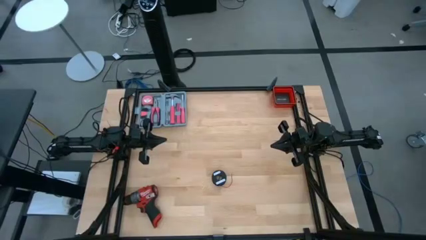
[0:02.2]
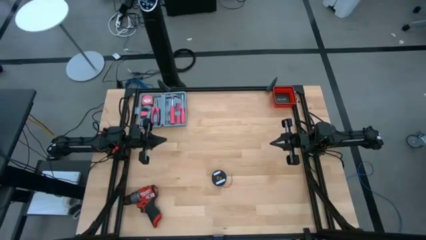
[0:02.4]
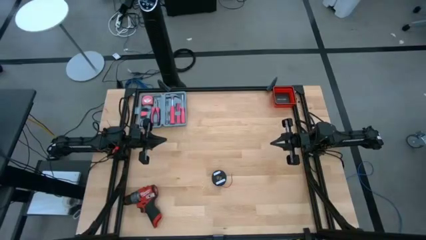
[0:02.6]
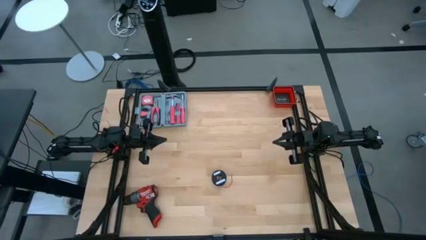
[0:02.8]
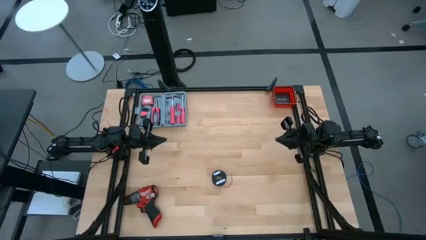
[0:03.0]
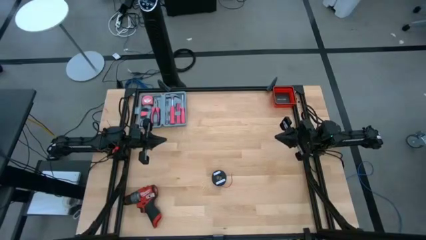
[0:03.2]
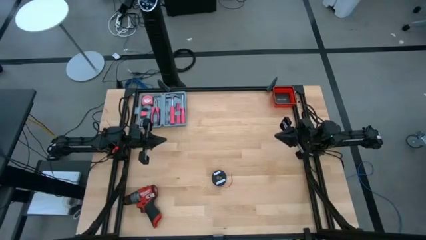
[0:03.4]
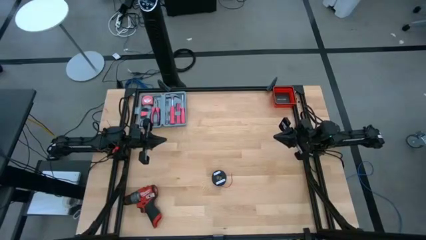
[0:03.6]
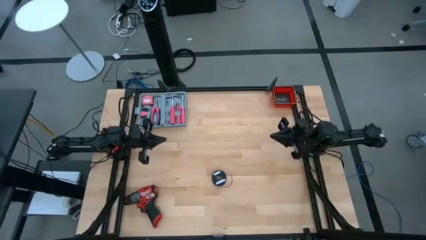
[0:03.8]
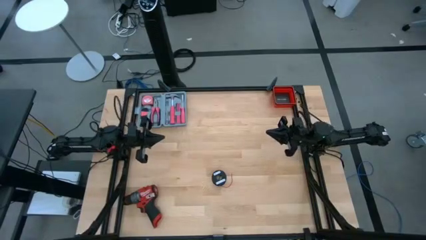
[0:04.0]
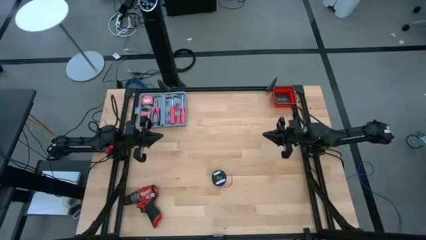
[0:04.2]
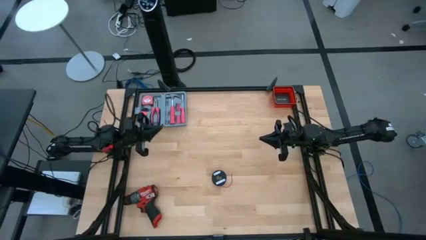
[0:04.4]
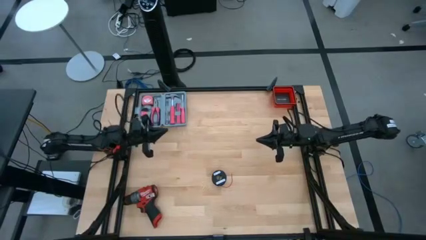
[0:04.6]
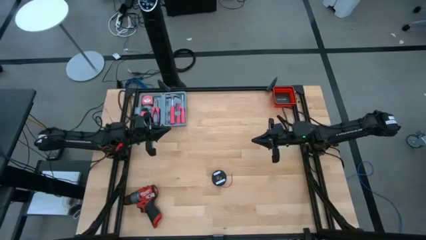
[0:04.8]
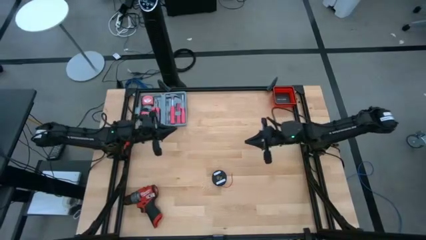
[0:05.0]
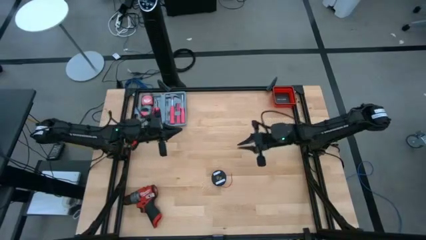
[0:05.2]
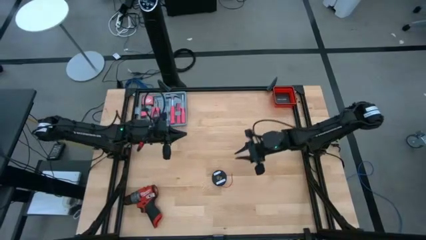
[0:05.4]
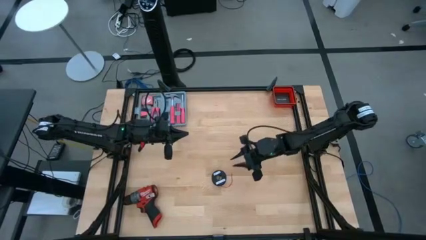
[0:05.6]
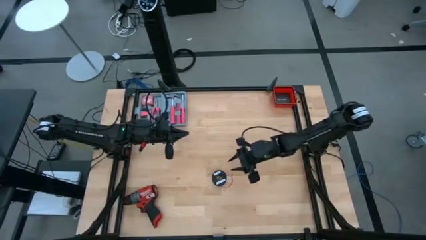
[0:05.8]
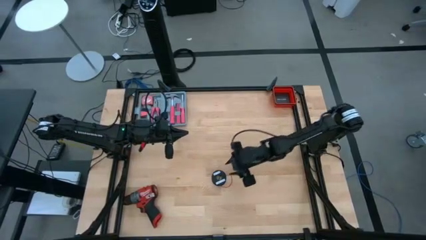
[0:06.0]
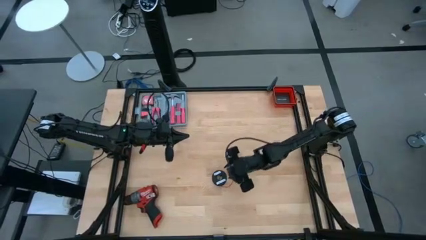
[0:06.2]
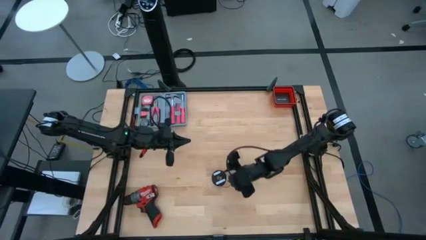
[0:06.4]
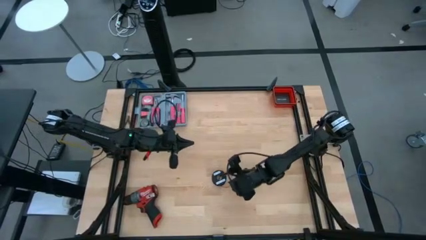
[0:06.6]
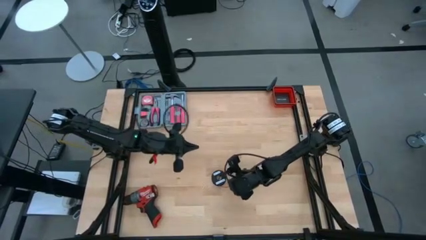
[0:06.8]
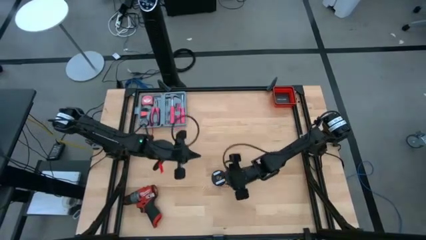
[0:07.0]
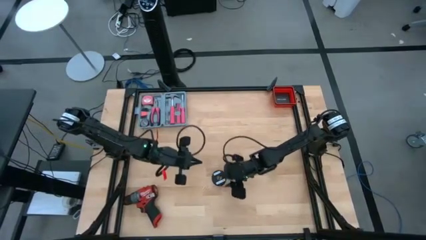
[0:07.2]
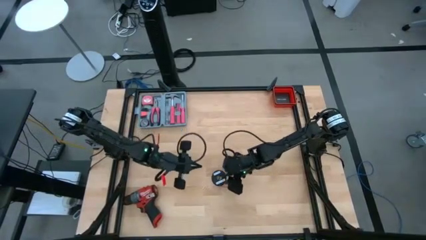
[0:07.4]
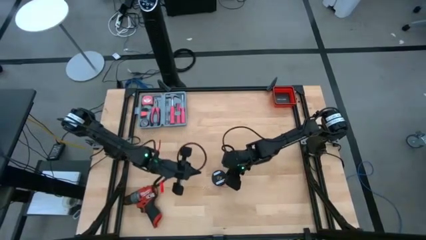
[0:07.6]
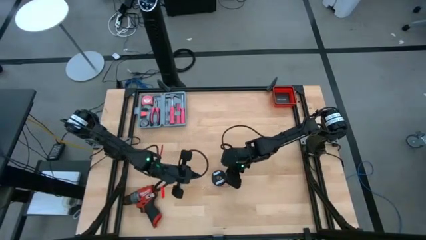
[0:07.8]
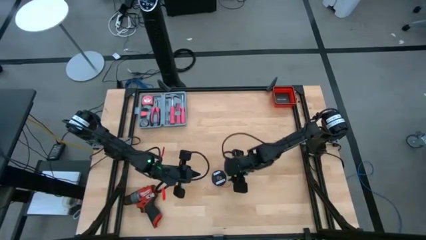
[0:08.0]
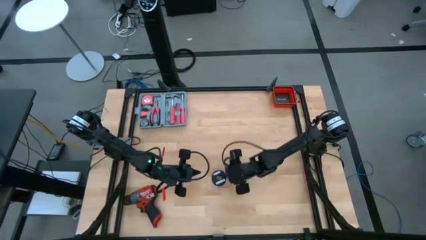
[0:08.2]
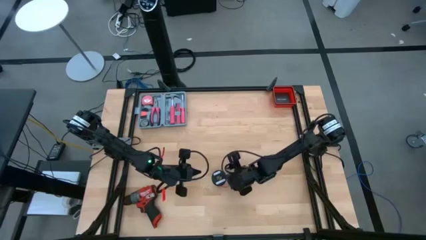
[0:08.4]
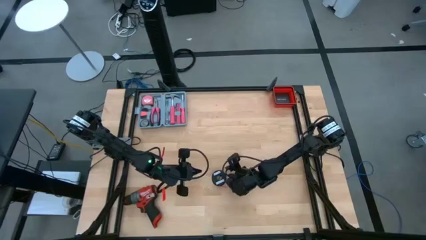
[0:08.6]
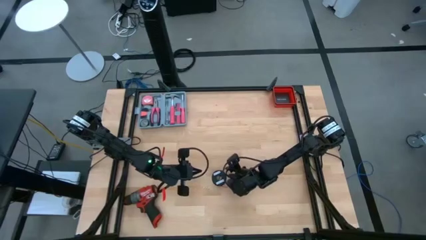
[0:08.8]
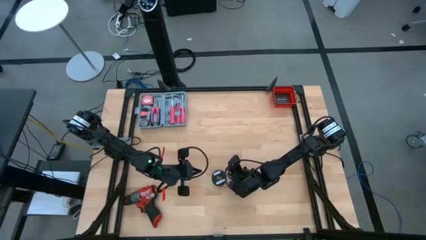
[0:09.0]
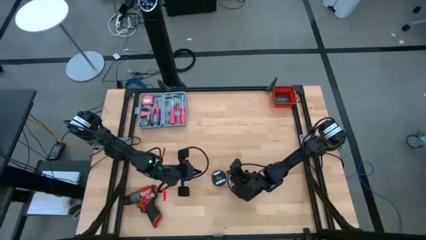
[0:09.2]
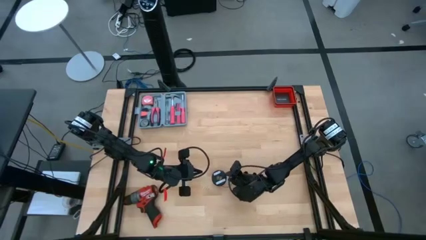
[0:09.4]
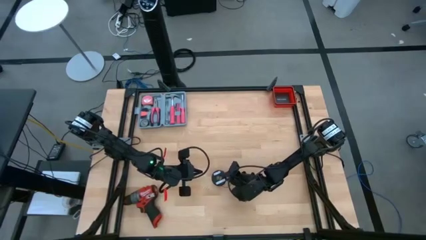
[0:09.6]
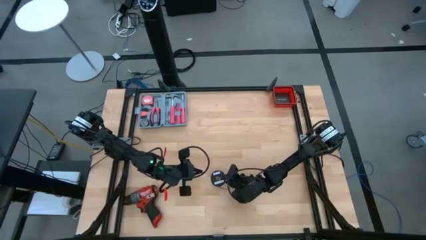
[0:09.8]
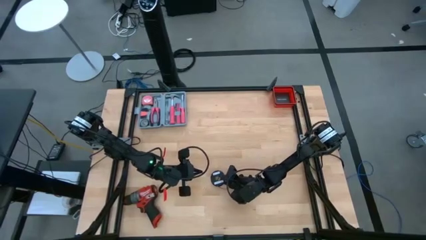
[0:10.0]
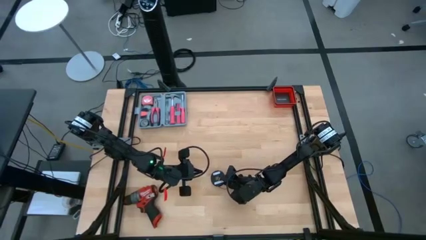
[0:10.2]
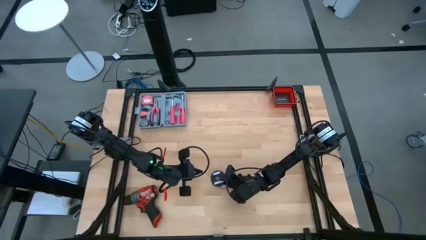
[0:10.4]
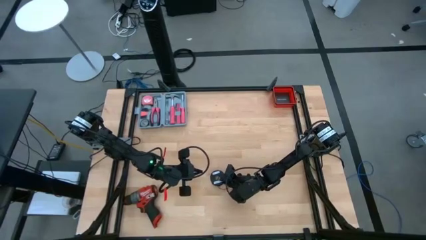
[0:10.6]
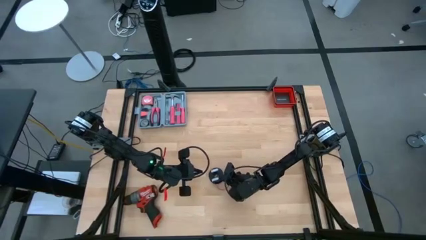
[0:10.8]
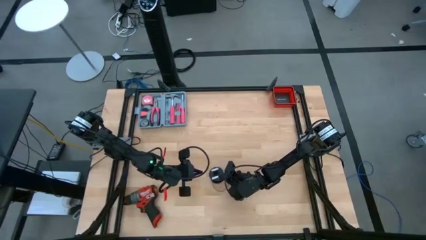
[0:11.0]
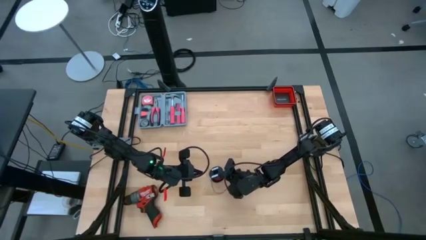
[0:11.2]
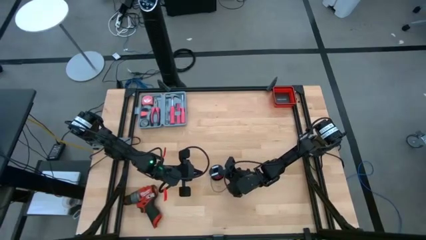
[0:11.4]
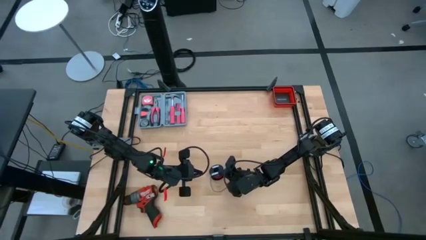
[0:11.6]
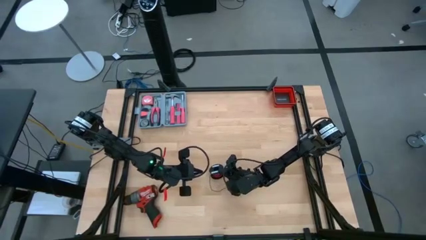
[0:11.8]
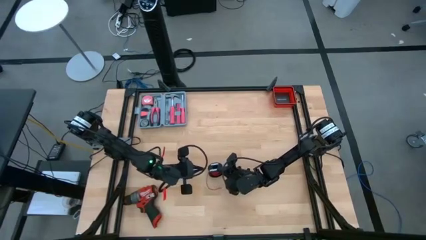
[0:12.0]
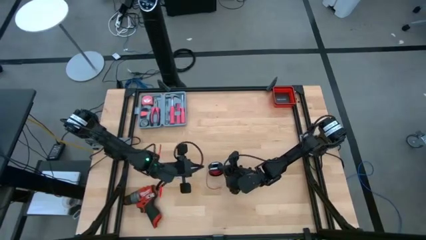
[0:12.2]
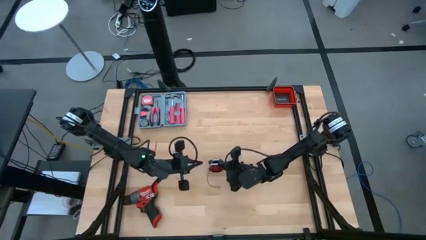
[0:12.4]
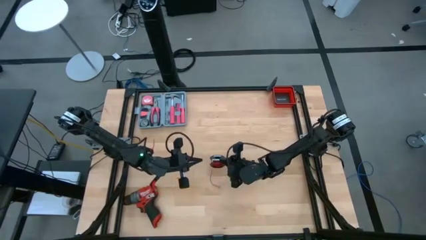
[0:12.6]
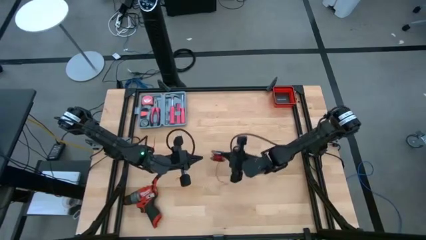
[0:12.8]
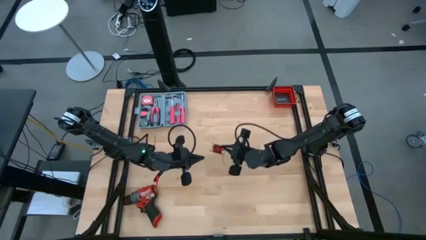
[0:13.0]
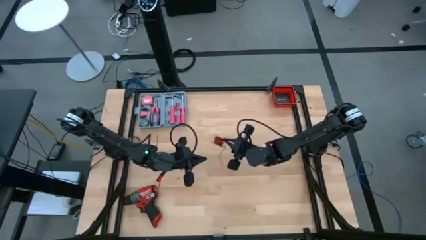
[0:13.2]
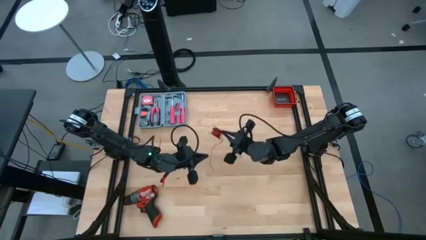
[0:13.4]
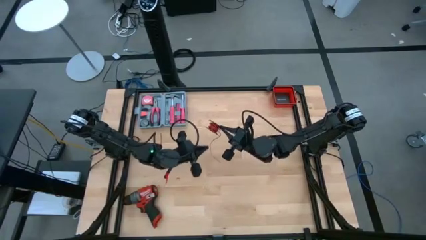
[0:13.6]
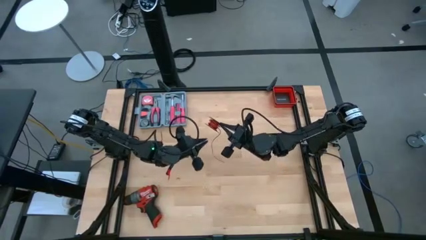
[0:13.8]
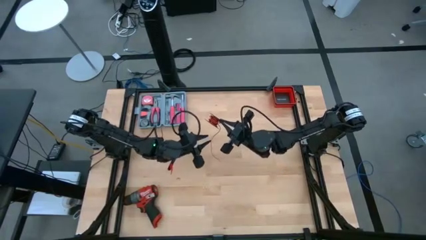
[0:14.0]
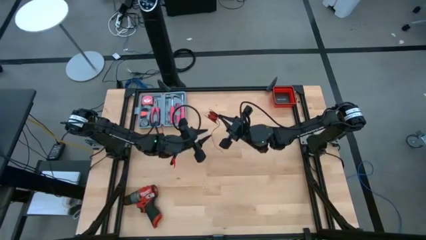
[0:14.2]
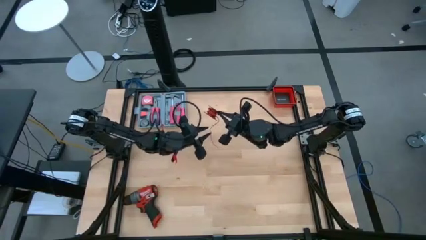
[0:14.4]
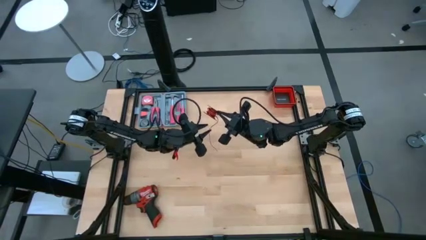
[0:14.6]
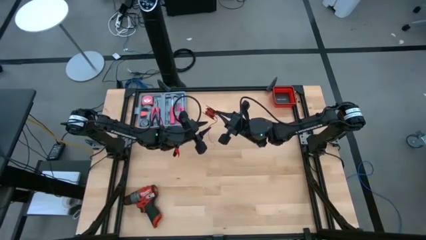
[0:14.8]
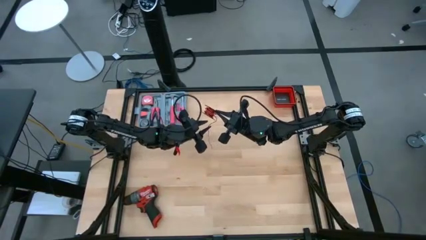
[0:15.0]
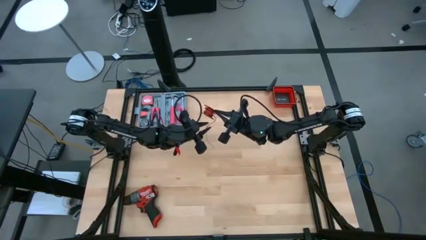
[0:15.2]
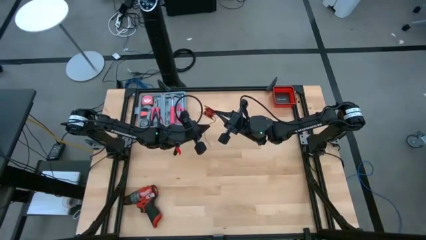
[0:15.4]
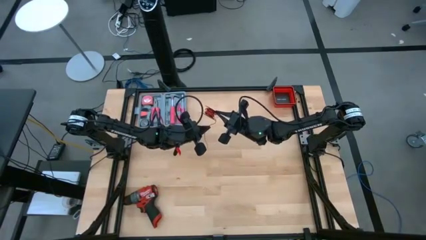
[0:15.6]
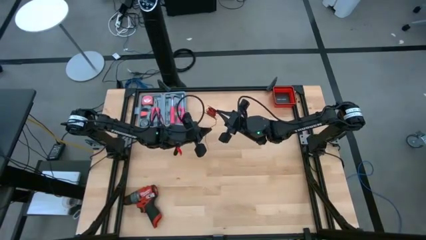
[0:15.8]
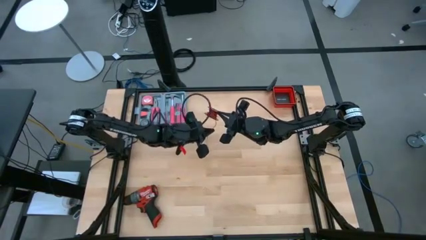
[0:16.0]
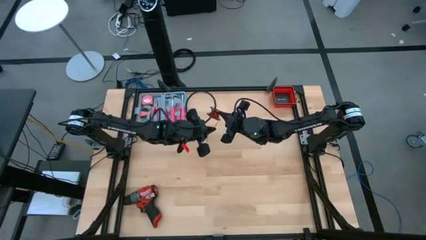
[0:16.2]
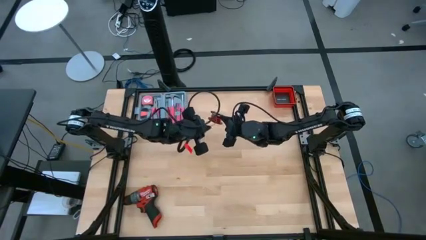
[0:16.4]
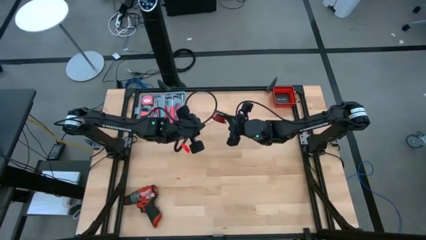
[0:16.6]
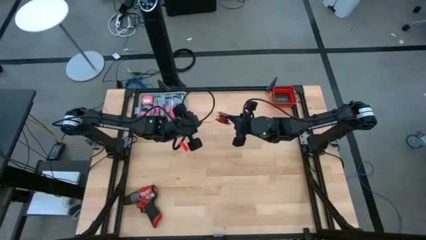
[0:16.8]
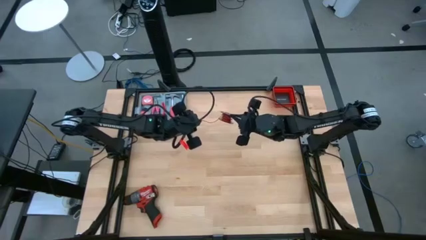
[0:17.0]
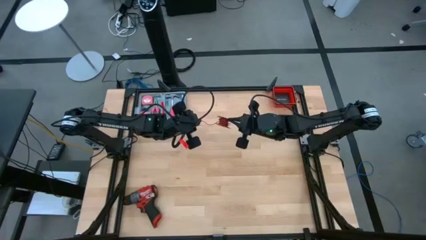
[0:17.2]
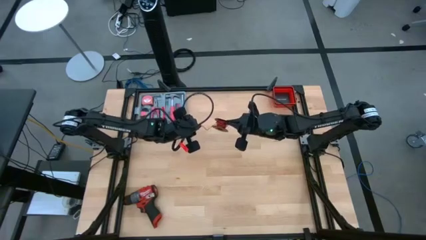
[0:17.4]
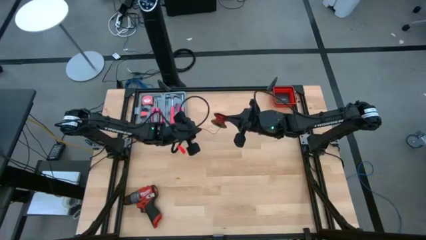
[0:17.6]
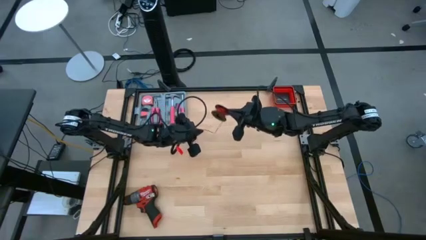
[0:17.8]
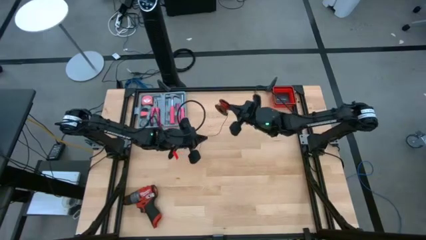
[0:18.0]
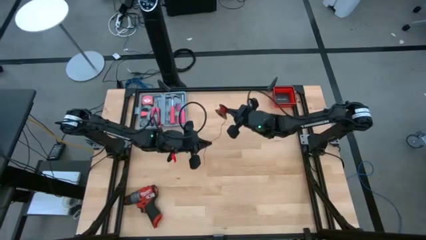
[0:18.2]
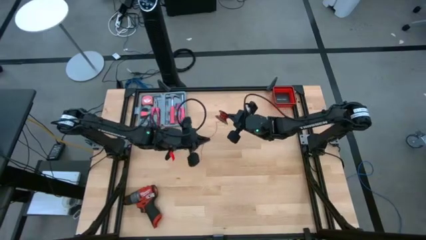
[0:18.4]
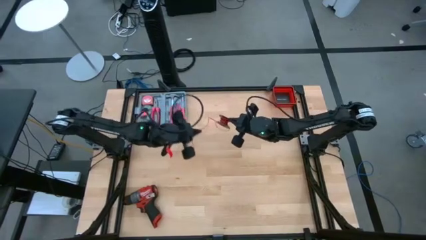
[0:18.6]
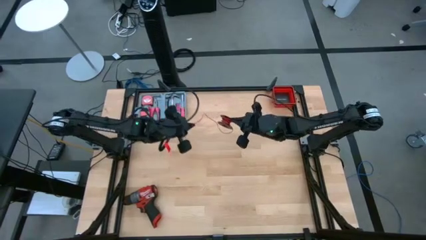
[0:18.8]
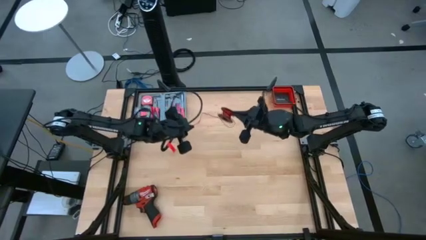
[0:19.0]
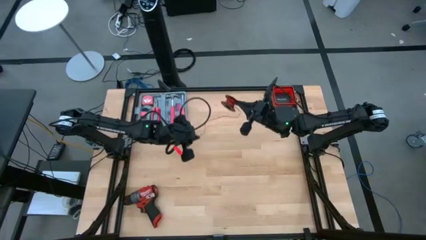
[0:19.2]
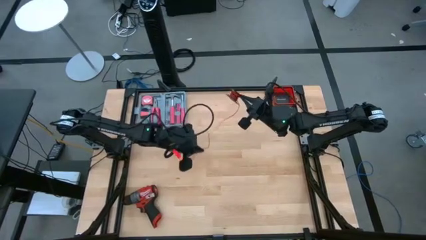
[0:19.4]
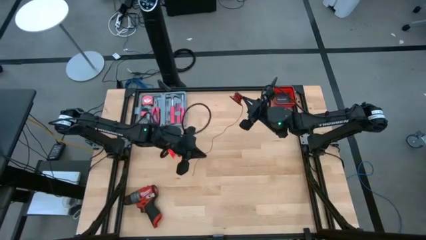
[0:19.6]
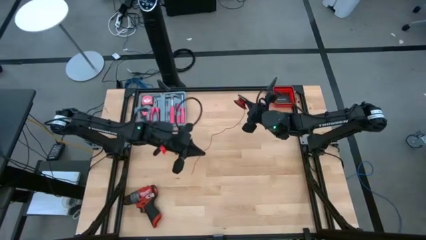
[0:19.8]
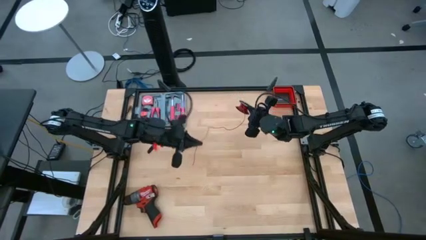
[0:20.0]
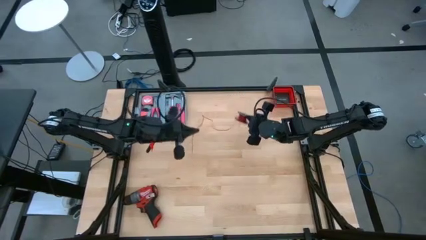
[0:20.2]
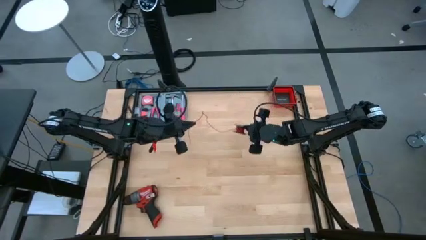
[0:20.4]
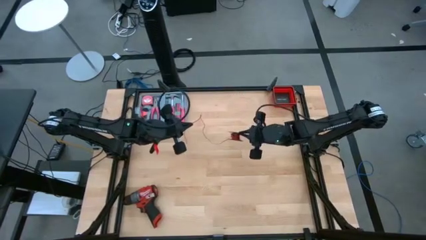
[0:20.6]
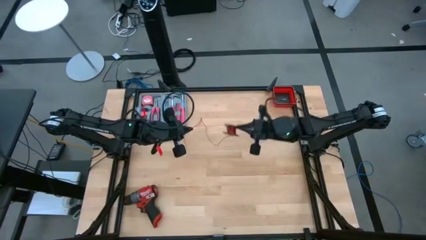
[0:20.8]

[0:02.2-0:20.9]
Task: Coil cords
Uncoil the red wire
